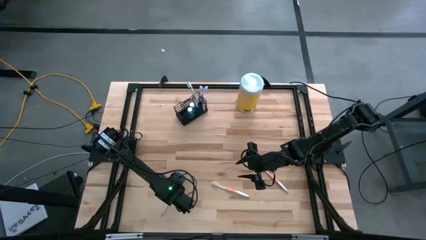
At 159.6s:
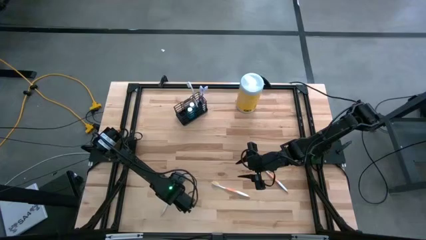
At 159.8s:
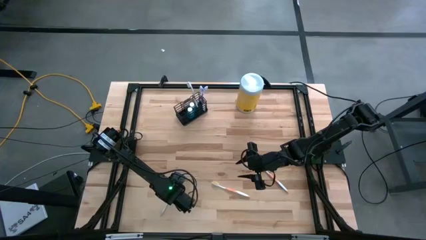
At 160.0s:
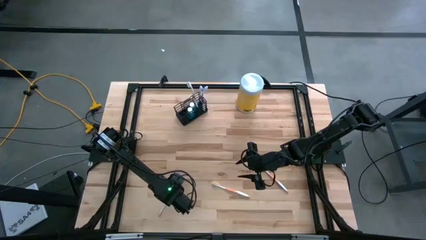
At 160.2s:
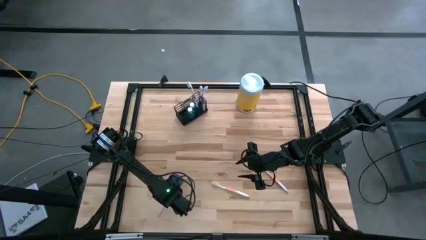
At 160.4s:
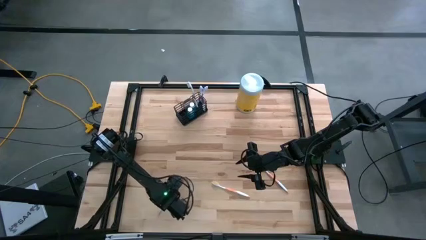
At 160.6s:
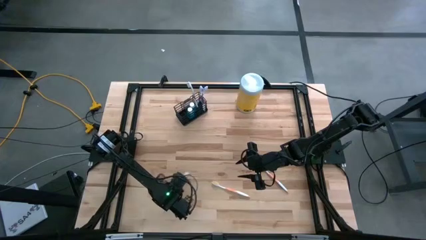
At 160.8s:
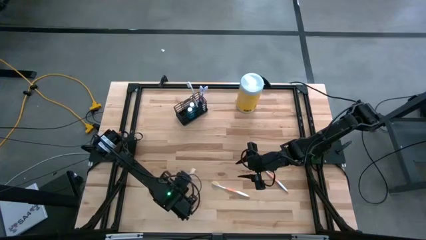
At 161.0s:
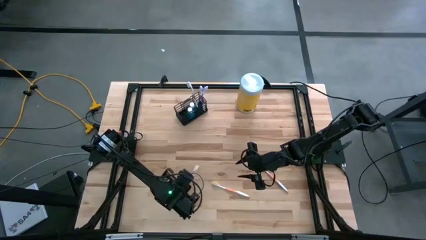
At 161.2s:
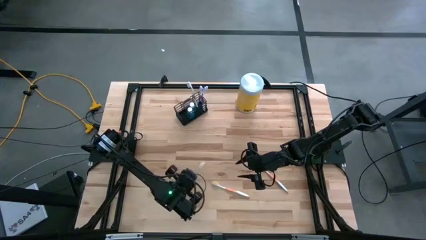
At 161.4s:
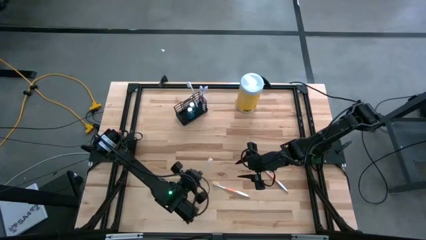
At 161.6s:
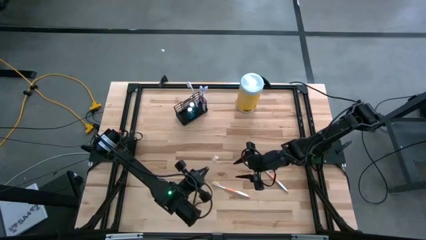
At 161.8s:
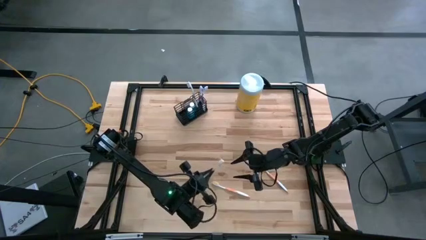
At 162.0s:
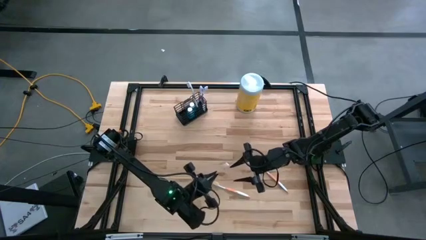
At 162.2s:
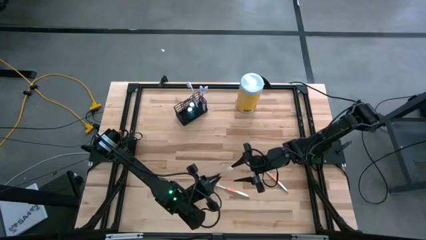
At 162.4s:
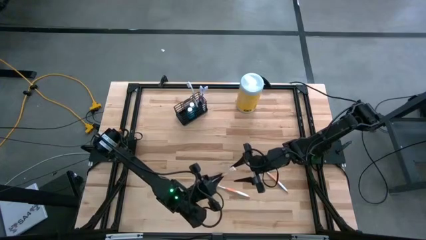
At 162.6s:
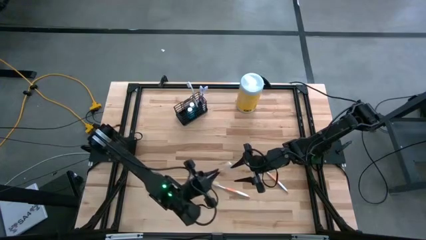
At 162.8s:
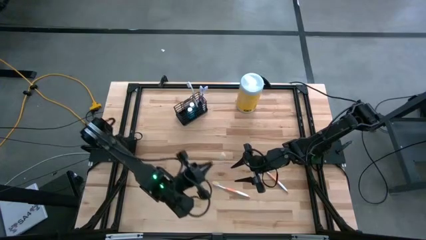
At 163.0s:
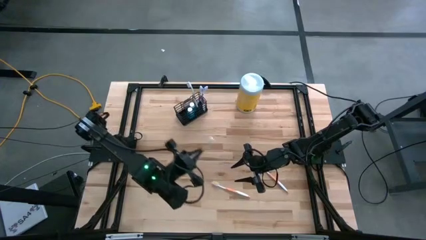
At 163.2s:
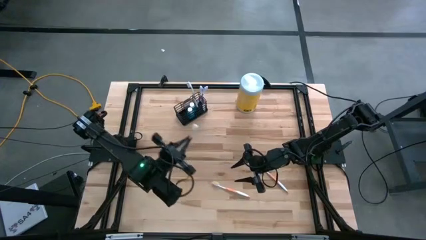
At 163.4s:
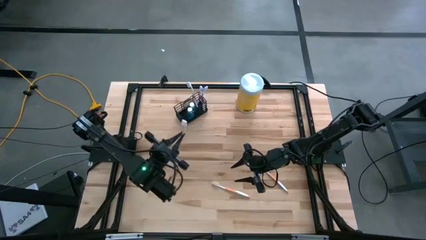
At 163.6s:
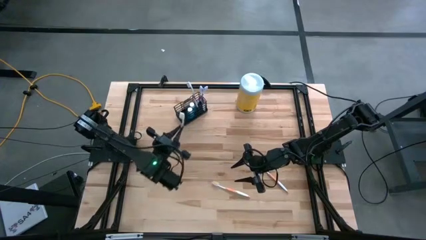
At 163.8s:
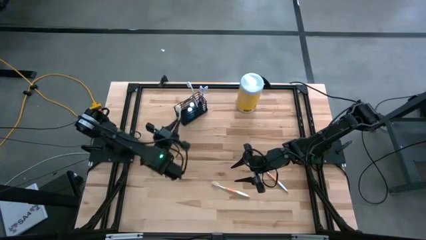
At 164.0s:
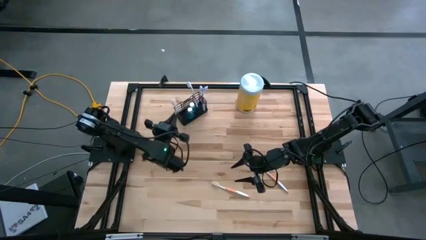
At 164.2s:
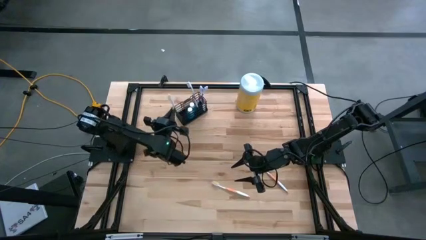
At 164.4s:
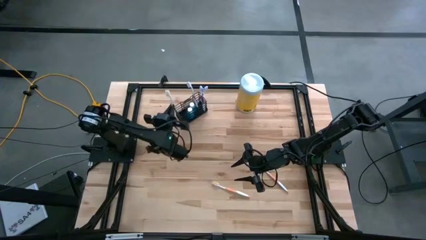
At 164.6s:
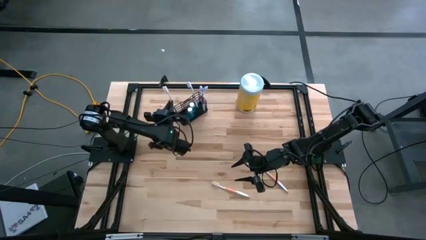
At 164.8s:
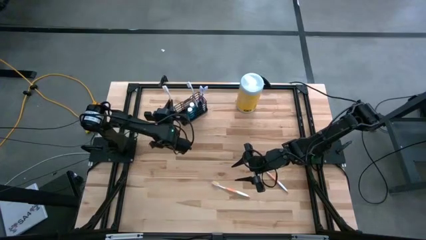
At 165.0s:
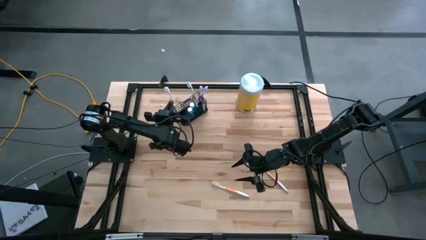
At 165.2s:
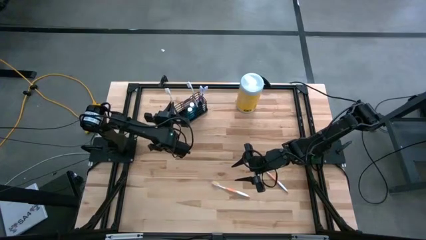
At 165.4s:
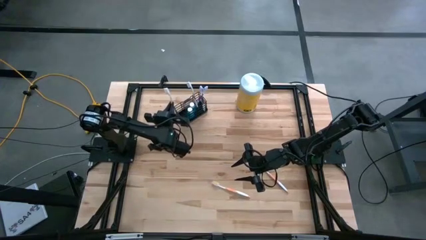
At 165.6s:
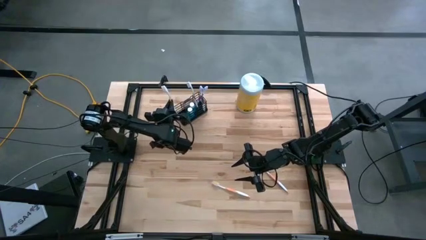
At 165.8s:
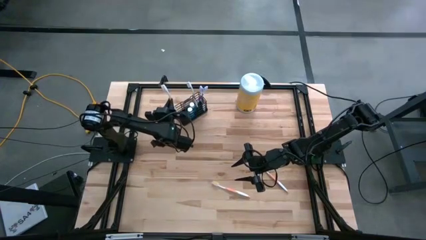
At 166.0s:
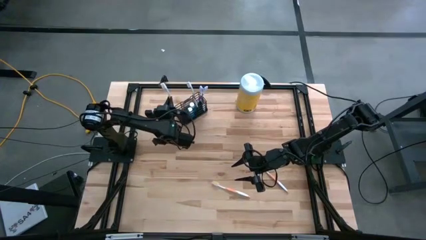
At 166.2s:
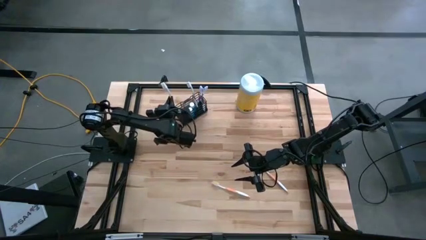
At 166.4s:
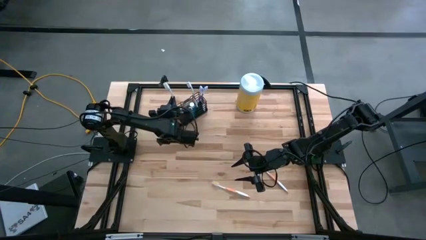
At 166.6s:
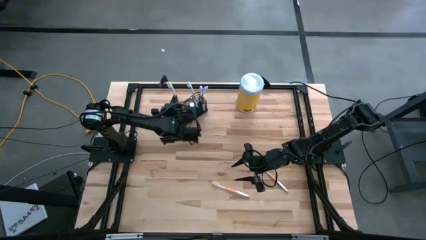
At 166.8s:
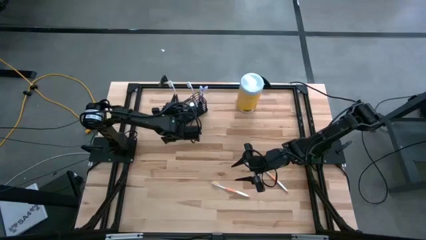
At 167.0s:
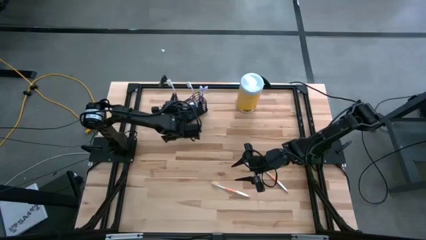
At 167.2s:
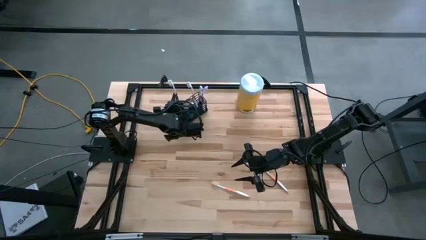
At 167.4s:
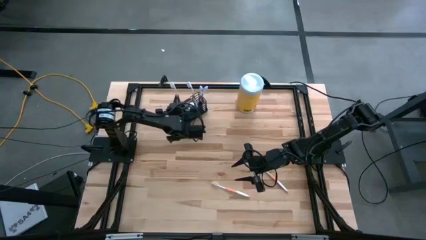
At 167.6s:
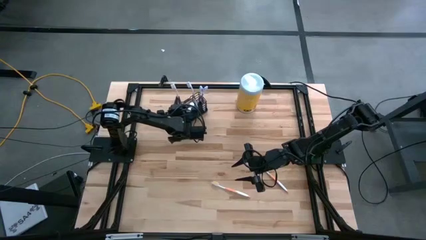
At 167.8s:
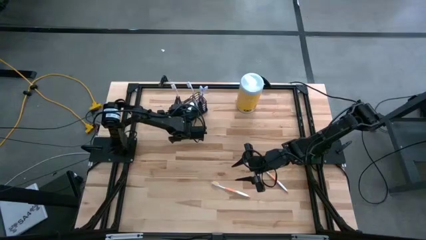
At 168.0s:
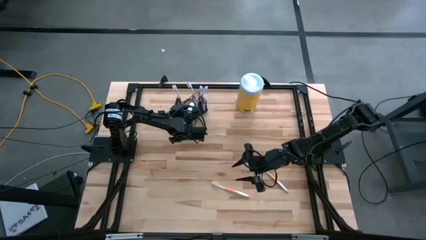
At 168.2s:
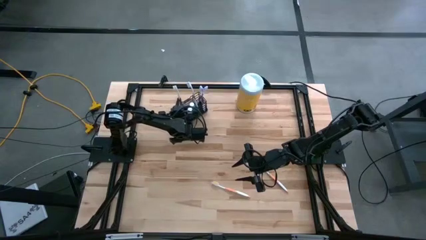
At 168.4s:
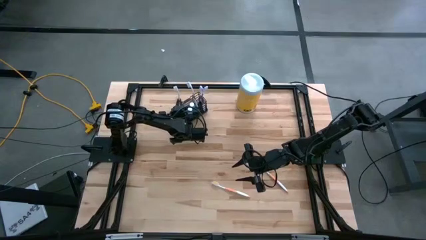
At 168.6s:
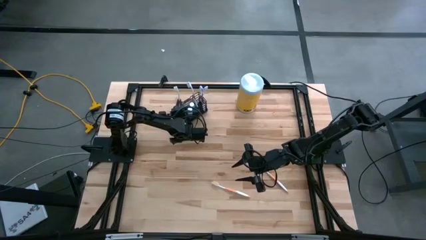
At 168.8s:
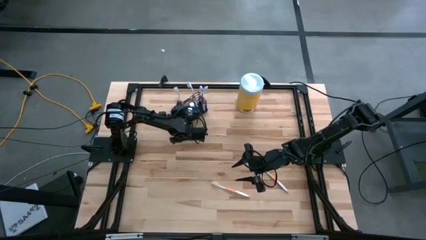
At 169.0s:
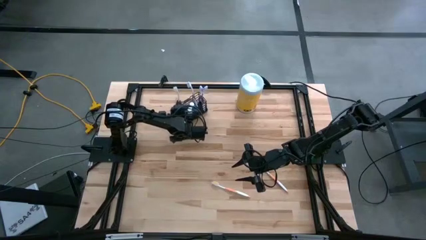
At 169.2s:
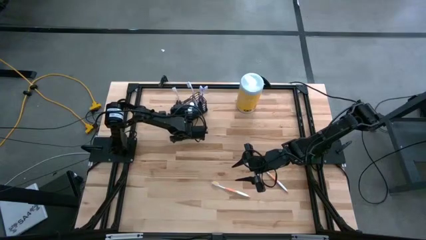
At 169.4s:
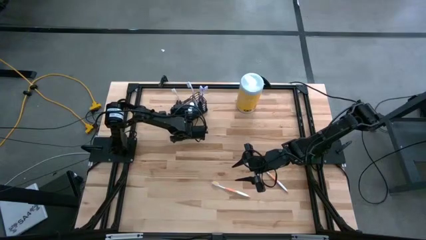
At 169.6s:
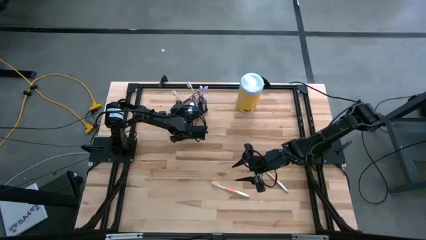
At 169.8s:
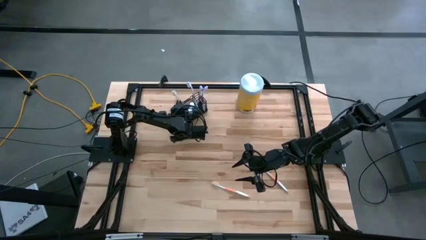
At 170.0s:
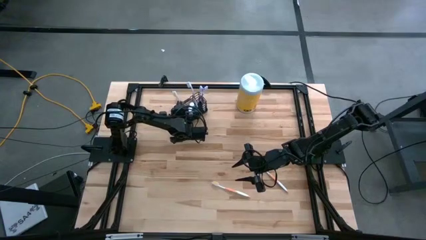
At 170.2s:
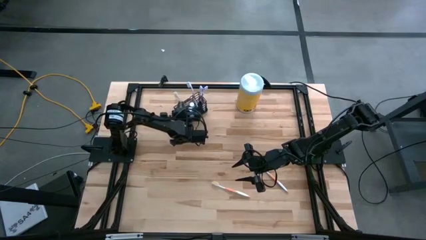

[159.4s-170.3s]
Task: Pick & Place toothbrushing station
Put the left orange toothbrush into the left section of the wire organizer

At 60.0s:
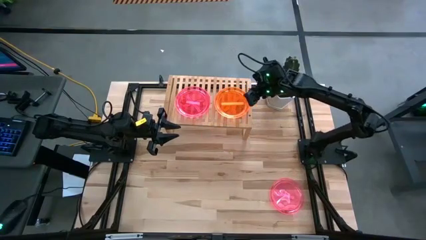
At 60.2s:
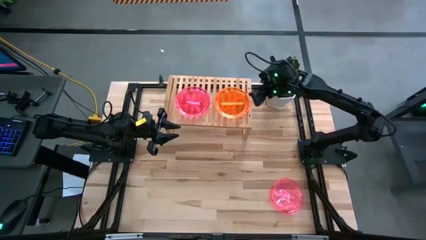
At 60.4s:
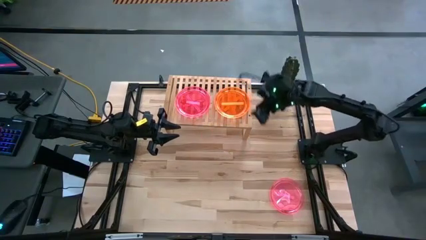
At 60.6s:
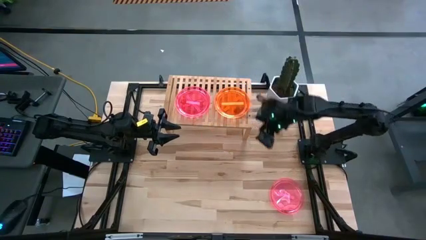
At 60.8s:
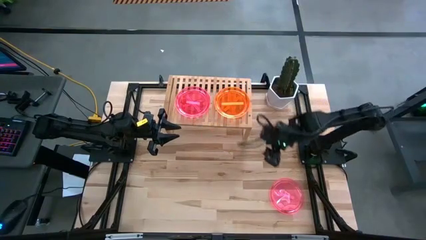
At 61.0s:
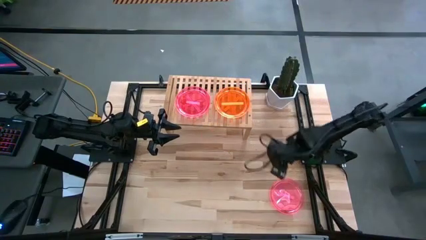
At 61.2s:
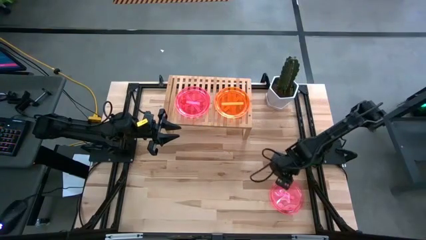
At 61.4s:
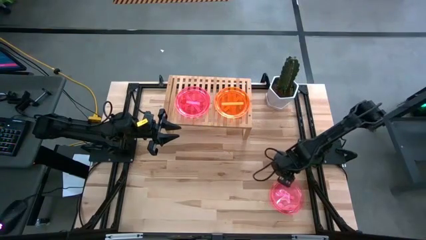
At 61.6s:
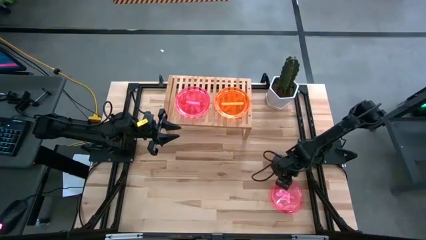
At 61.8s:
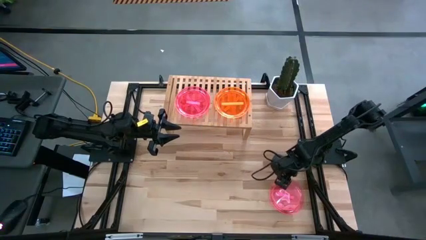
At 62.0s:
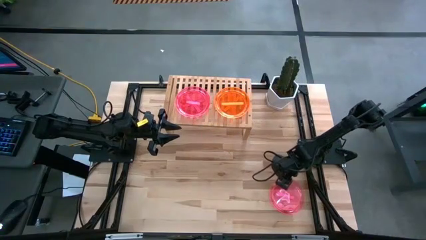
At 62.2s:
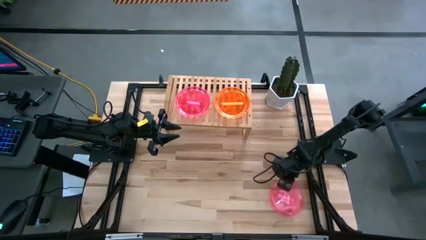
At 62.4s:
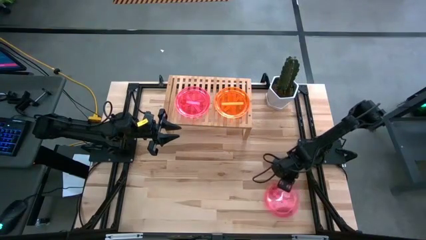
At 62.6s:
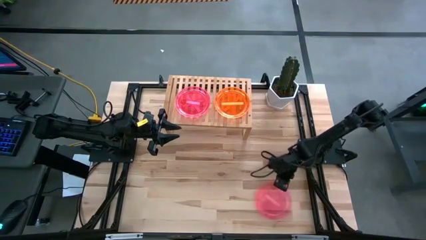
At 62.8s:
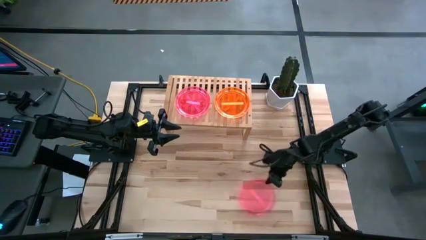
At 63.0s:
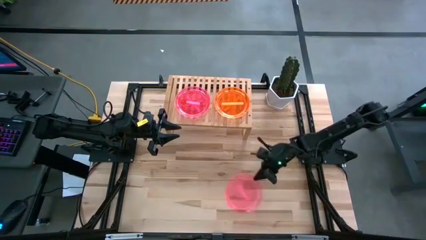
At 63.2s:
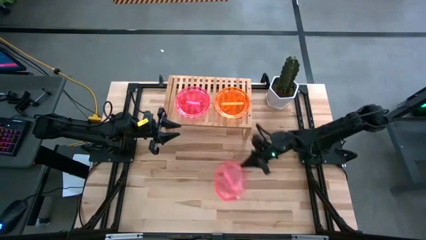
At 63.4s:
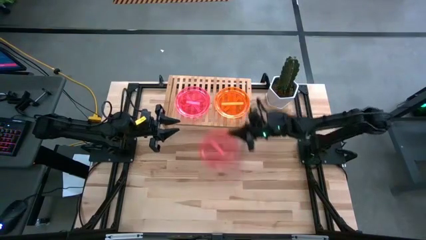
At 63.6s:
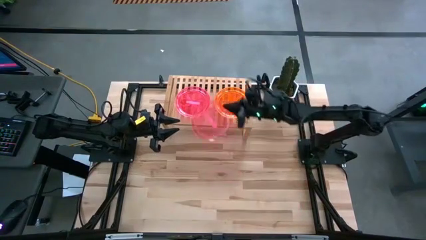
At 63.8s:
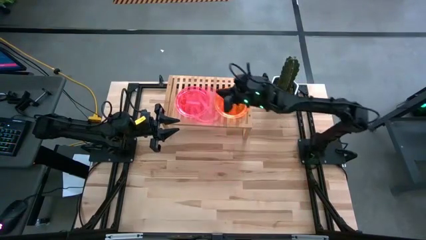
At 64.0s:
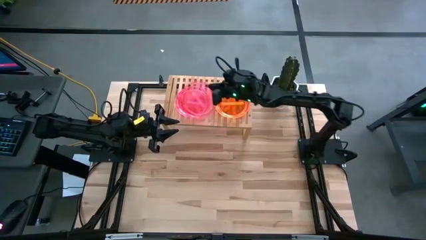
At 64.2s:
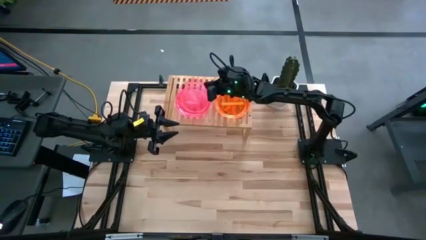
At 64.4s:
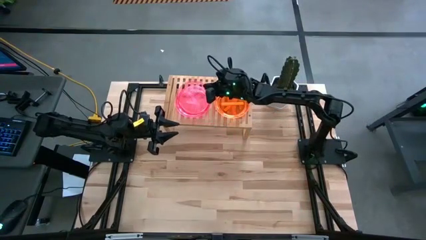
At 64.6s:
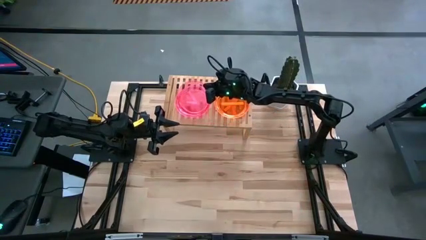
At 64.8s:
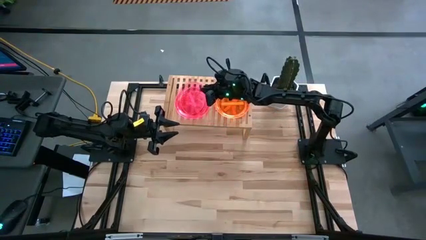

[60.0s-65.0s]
Task: Place and stack plates onto a shelf
Stack the pink plate on top of the other pink plate on the shelf
